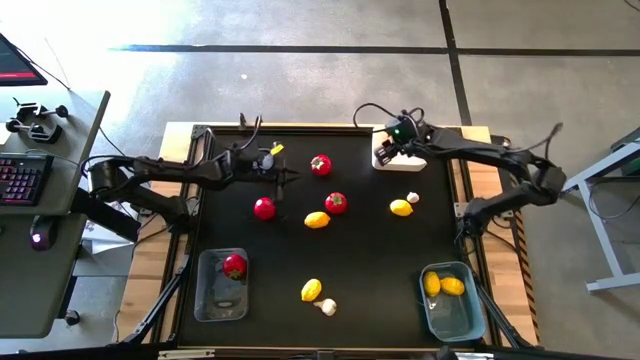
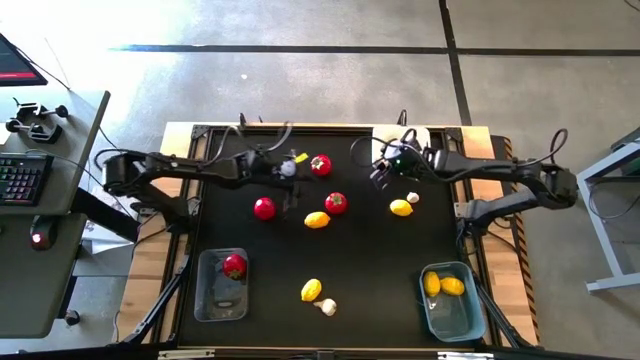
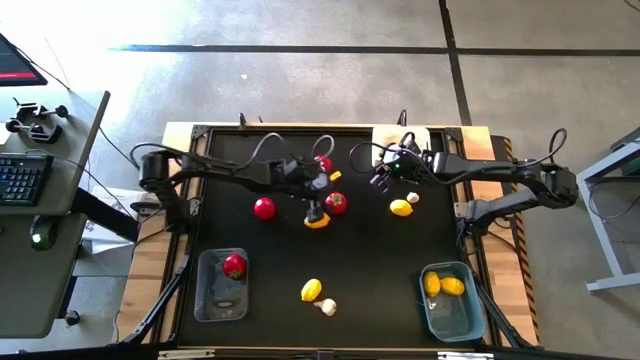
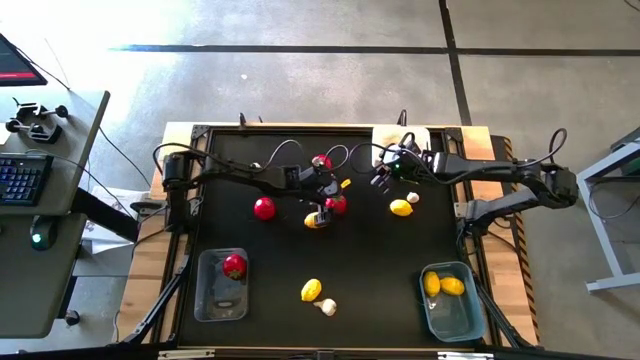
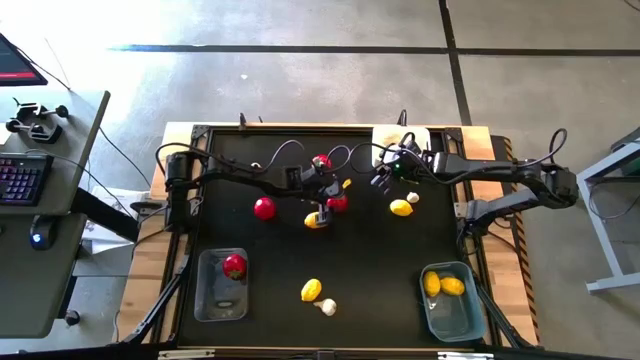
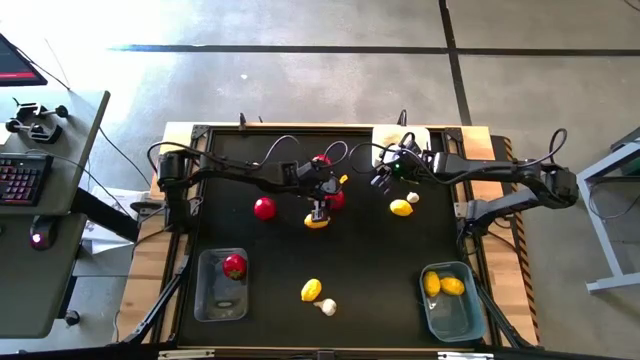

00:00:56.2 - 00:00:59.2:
Task: Sort produce into baskets
Put the tomato into the transparent bin

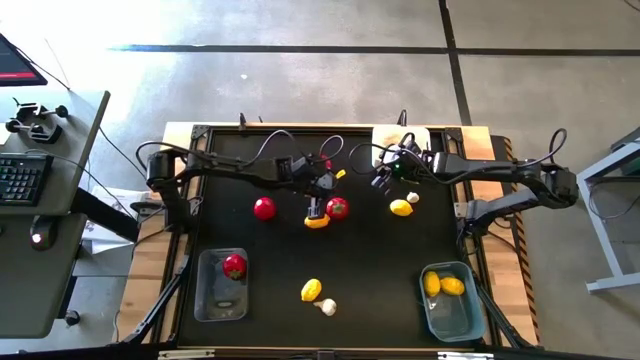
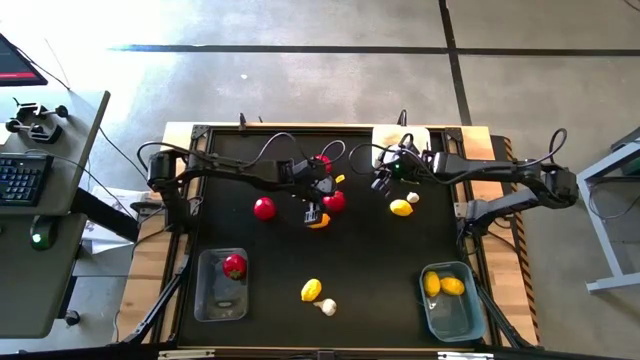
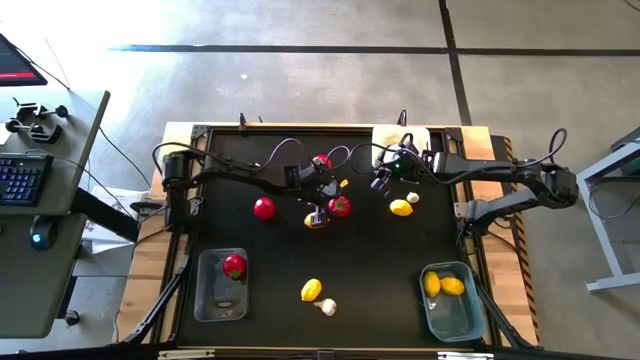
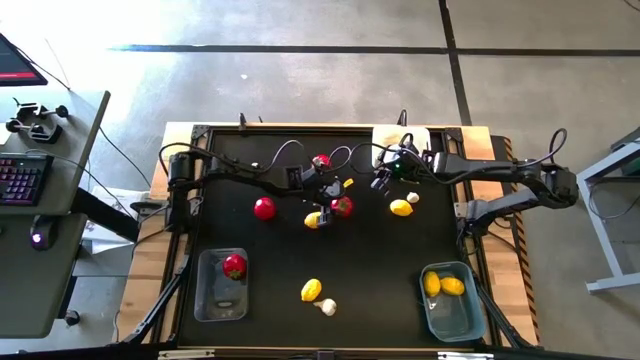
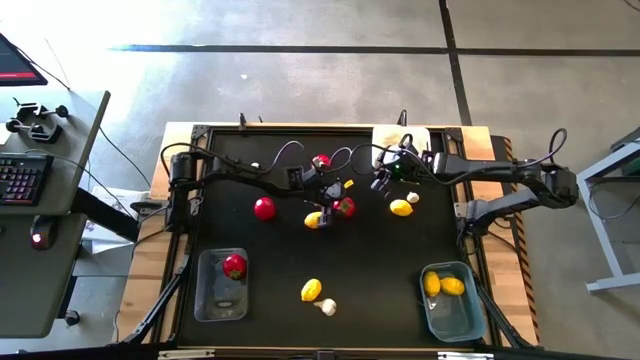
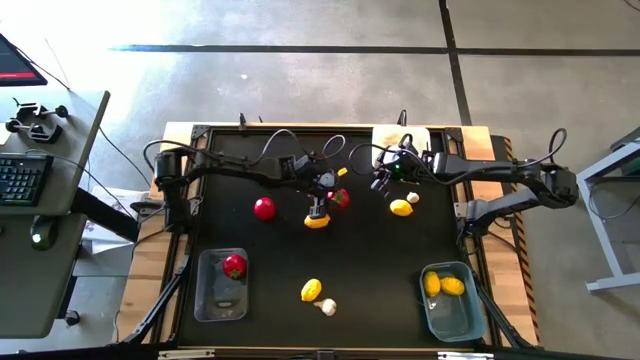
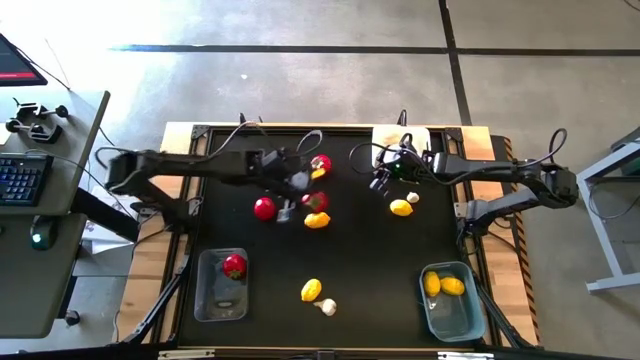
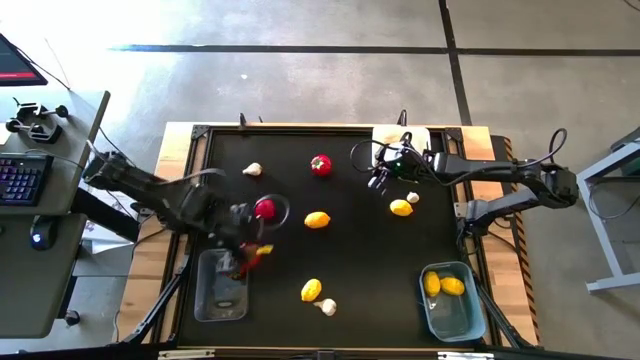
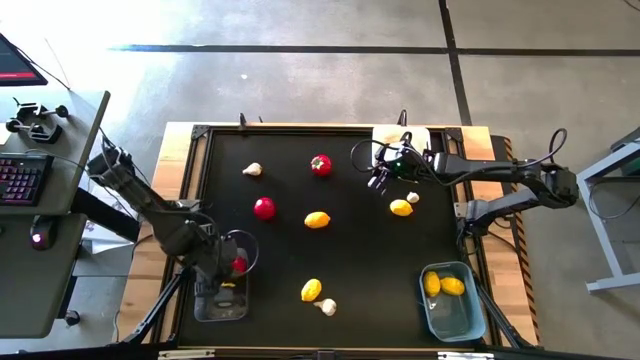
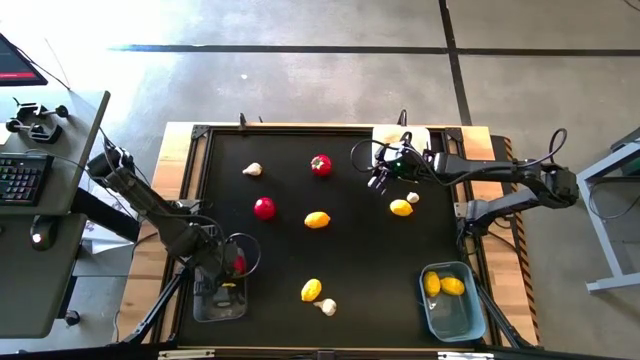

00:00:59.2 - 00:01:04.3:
Put the tomato into the transparent bin

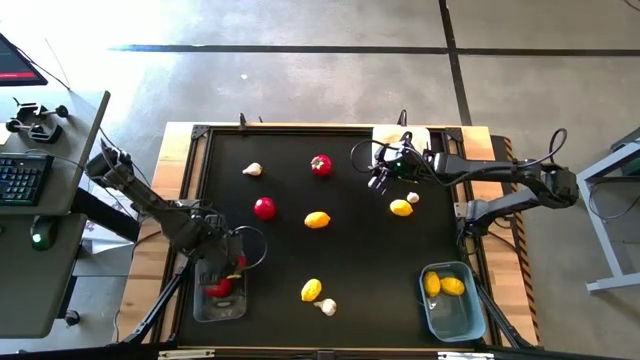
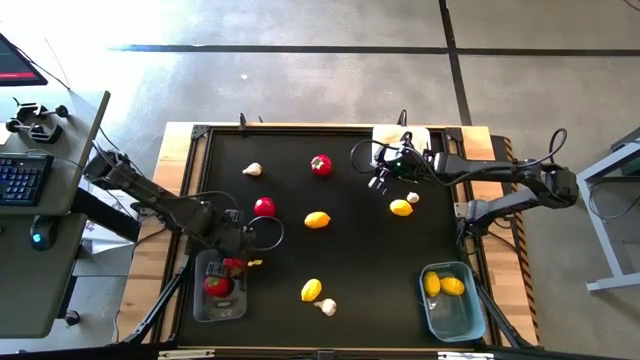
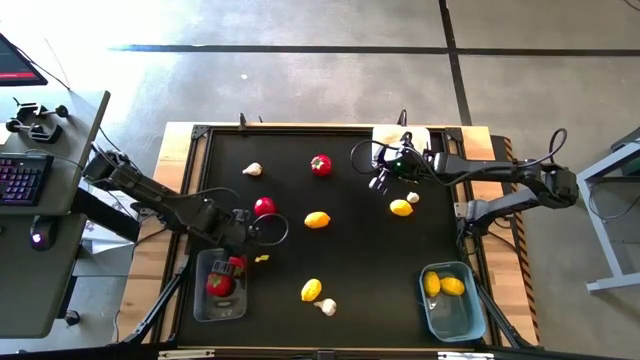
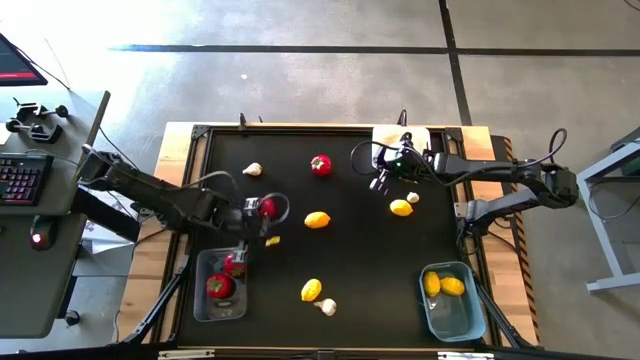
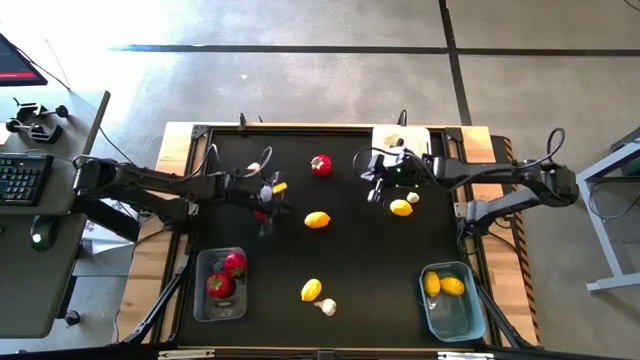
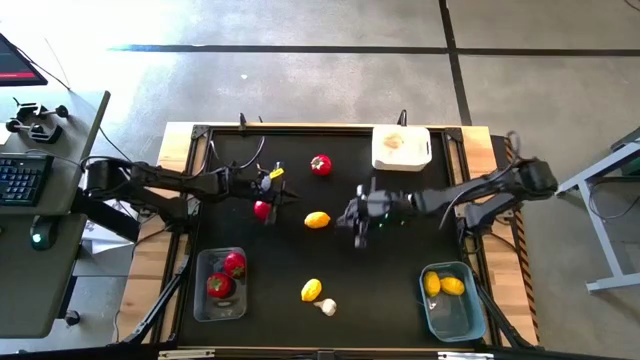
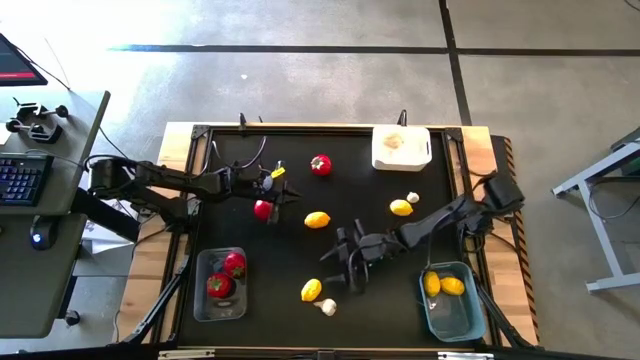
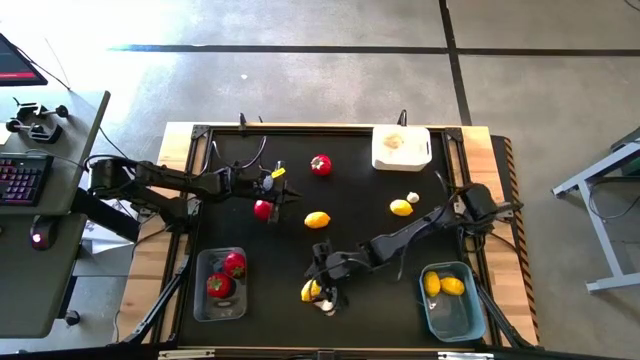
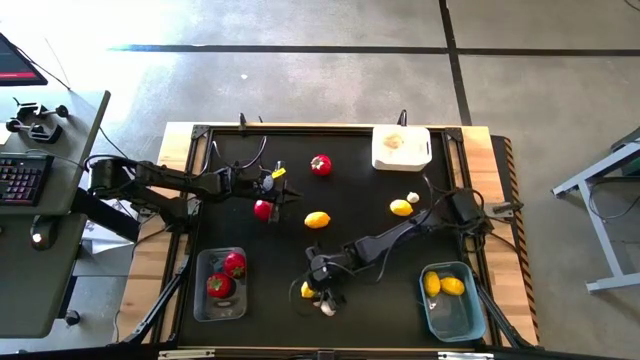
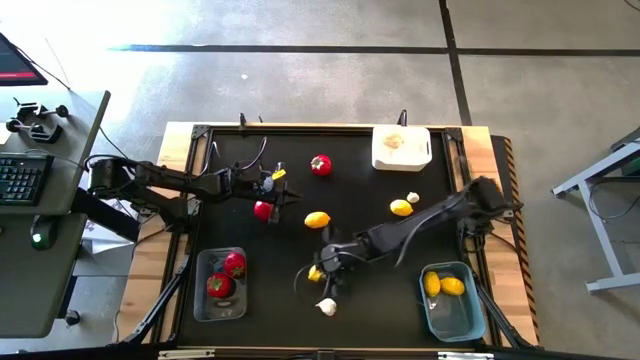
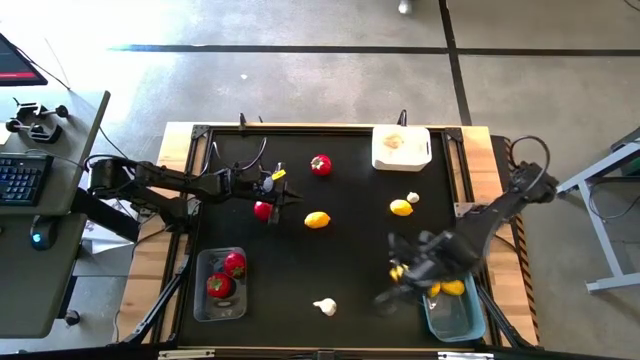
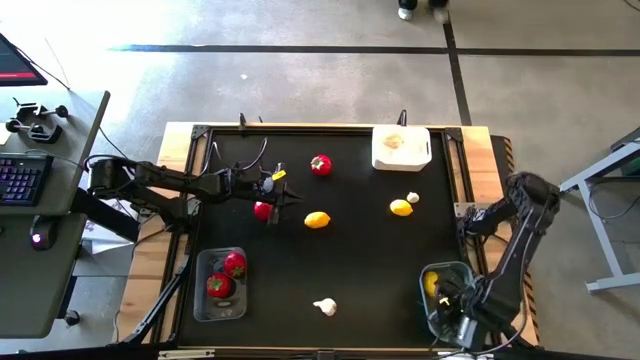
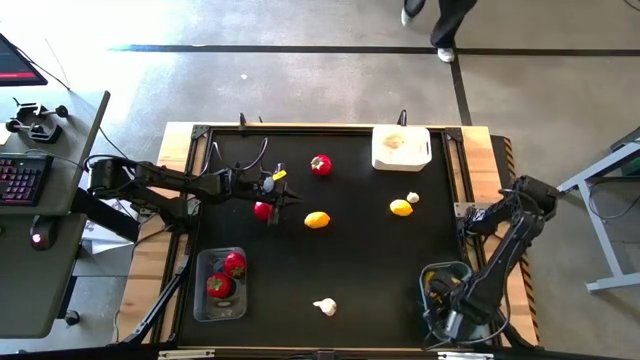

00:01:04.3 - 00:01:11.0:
Put the lemon into the blue bin

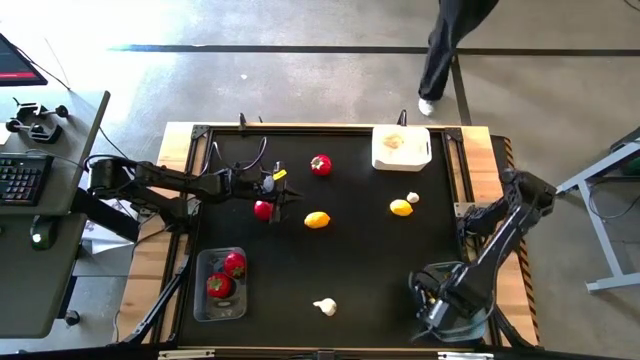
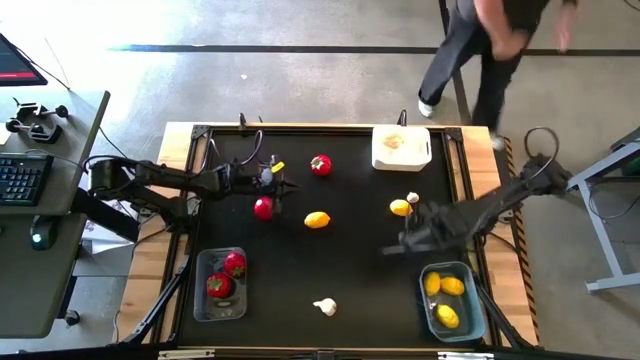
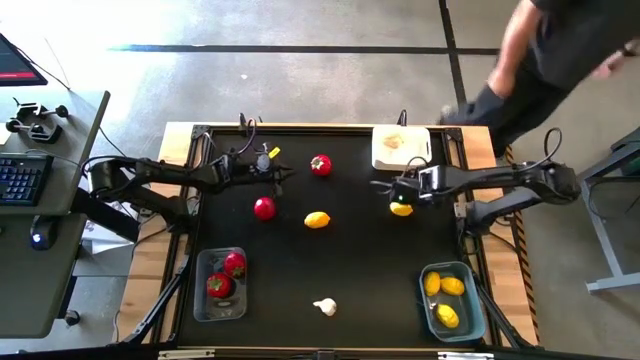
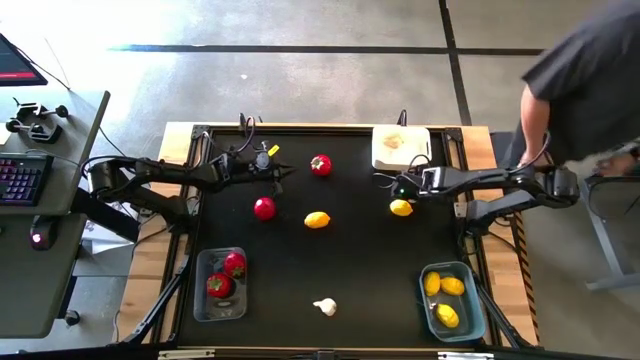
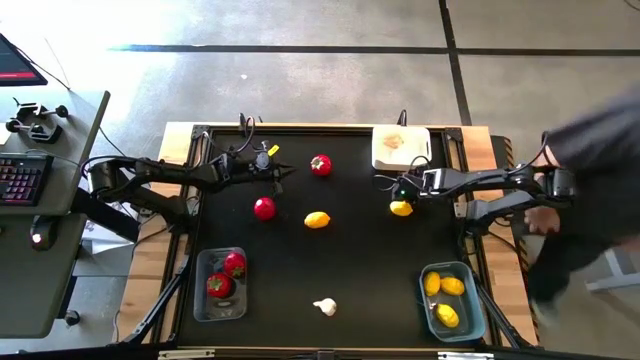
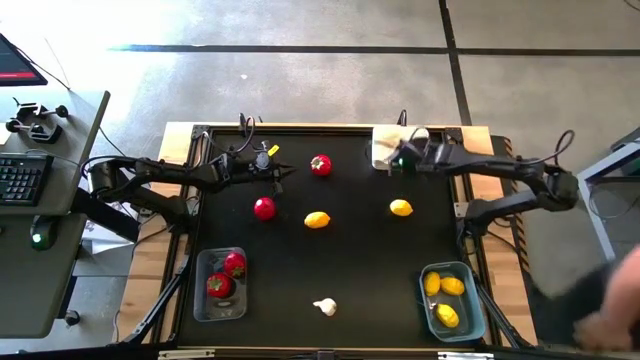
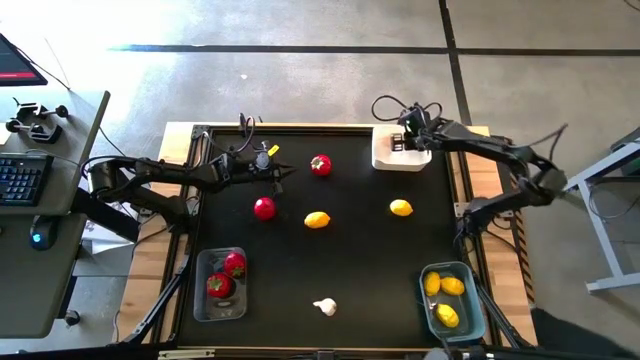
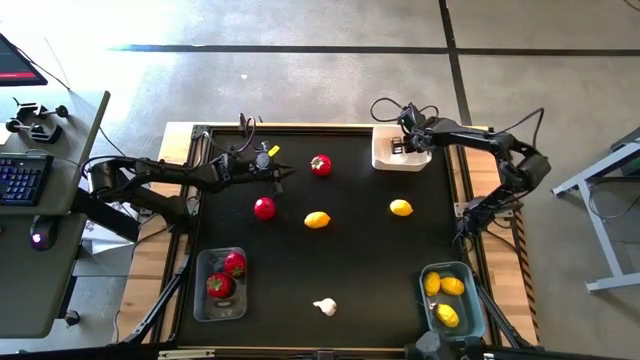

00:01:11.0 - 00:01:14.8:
Put the garlic into the white bin

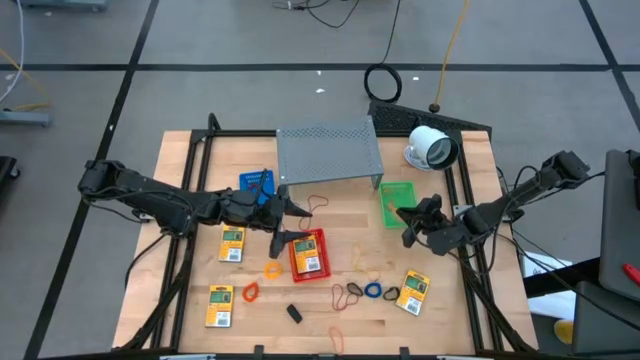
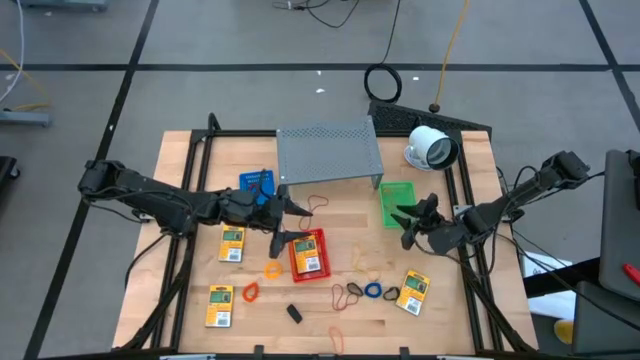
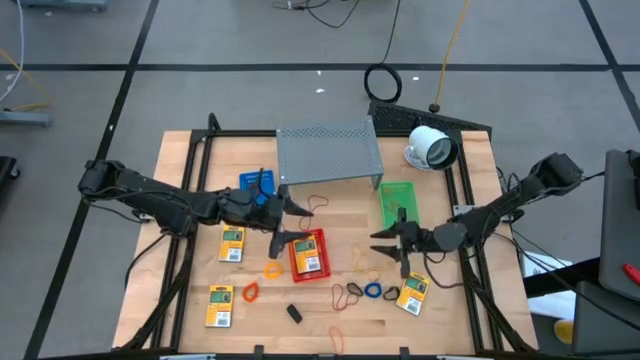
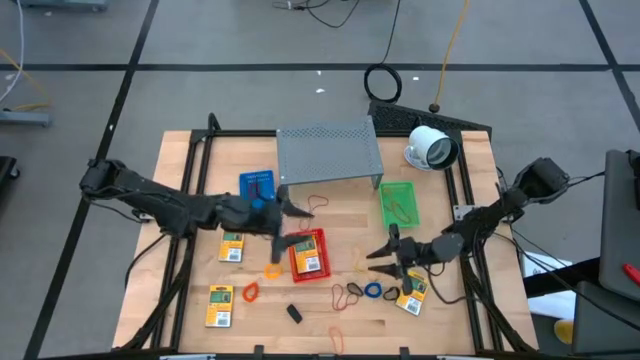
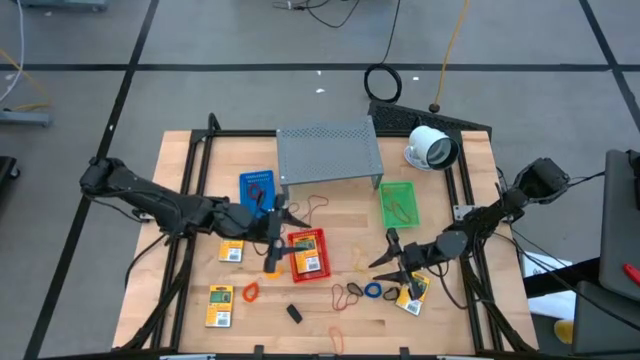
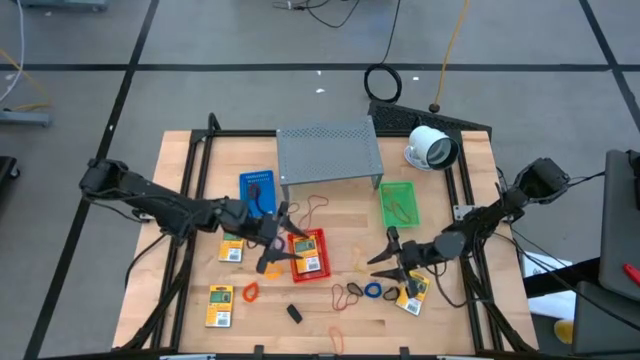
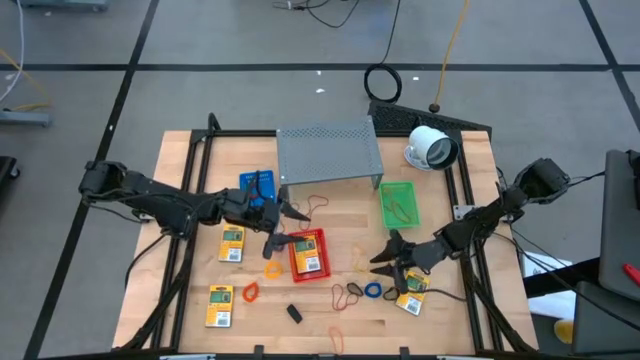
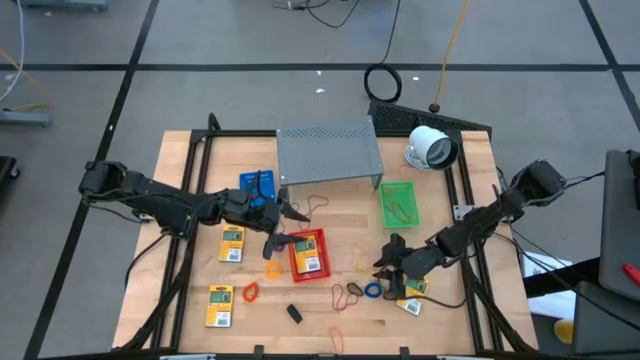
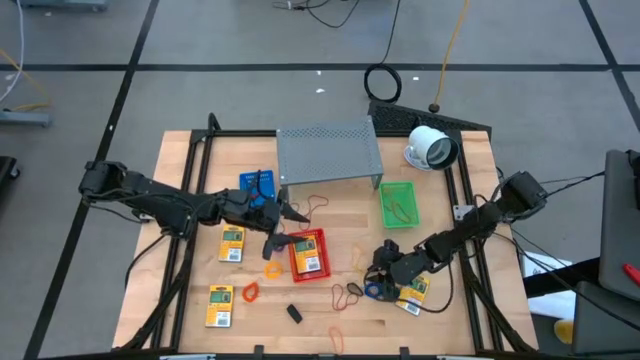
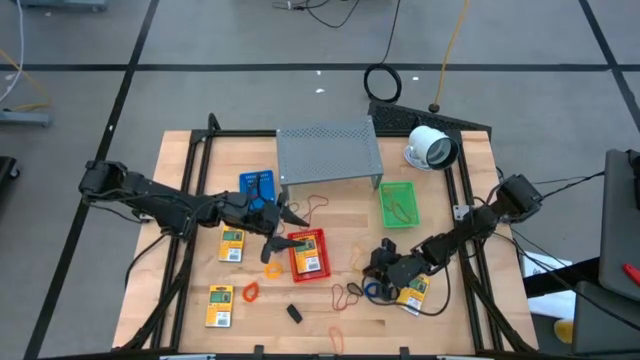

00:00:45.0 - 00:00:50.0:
Task: Pick & Place Office Desk Supplies
Put the yellow rubber band into the green bin
